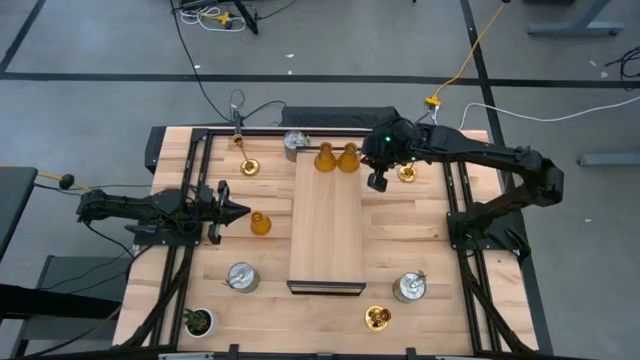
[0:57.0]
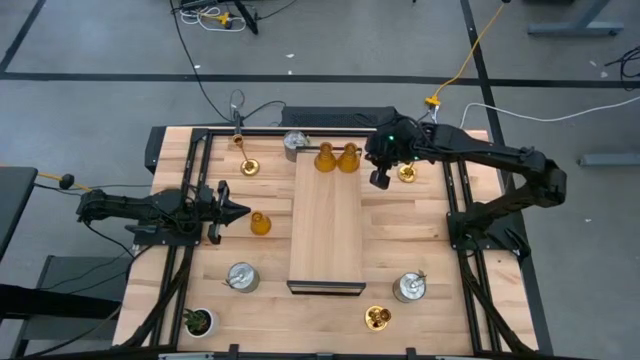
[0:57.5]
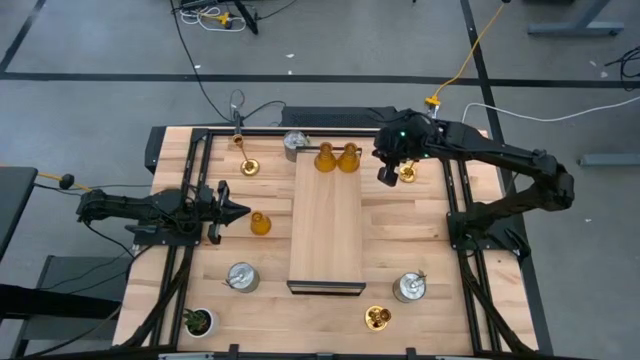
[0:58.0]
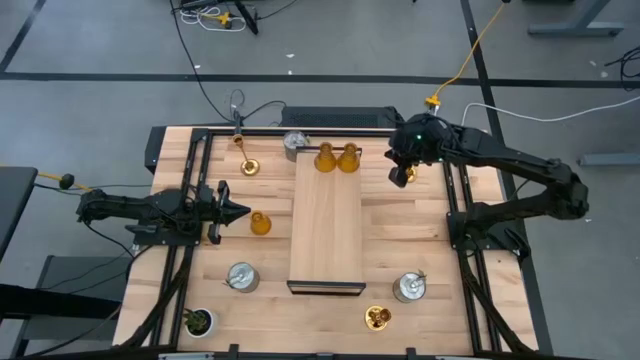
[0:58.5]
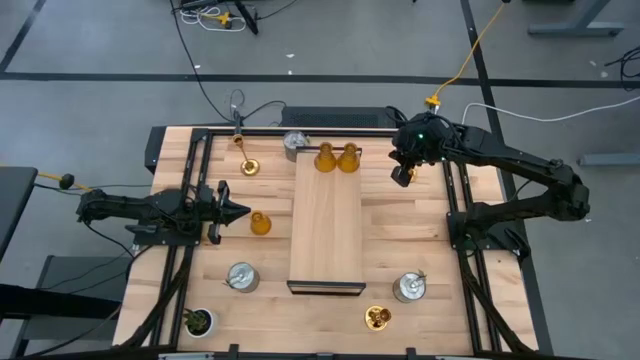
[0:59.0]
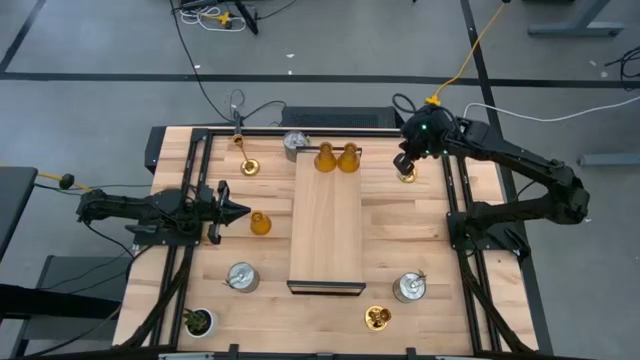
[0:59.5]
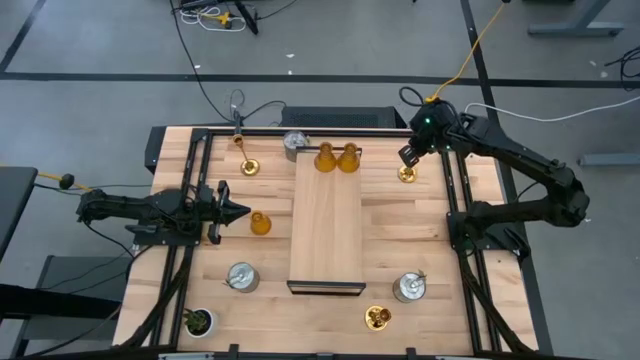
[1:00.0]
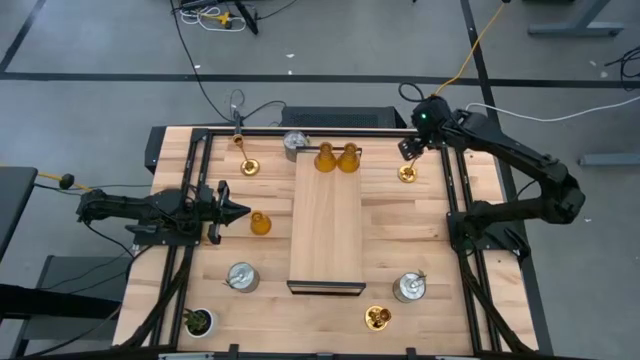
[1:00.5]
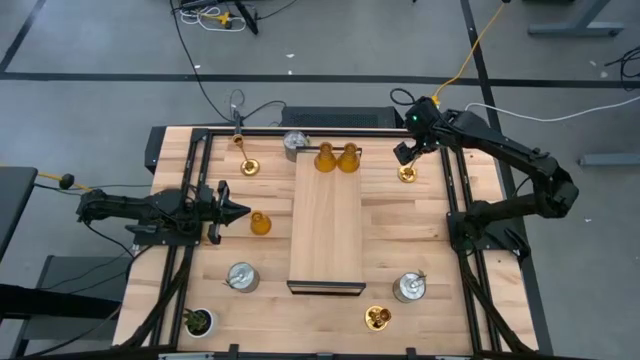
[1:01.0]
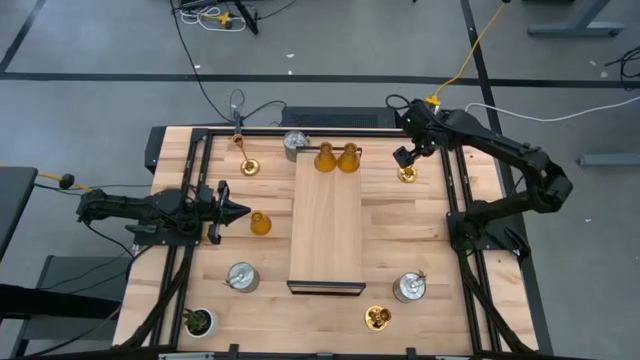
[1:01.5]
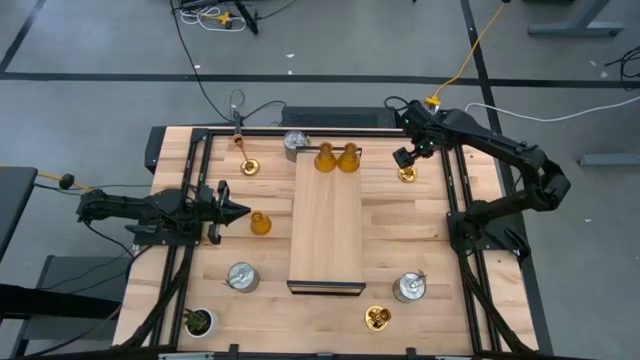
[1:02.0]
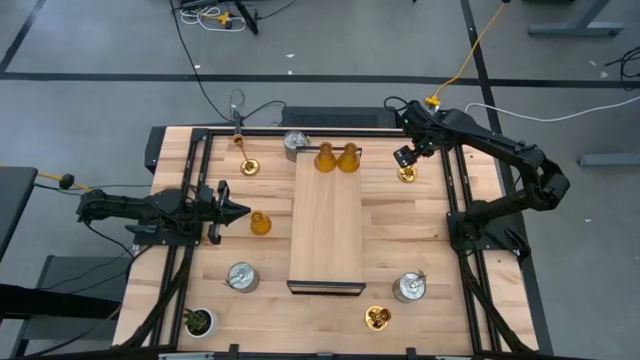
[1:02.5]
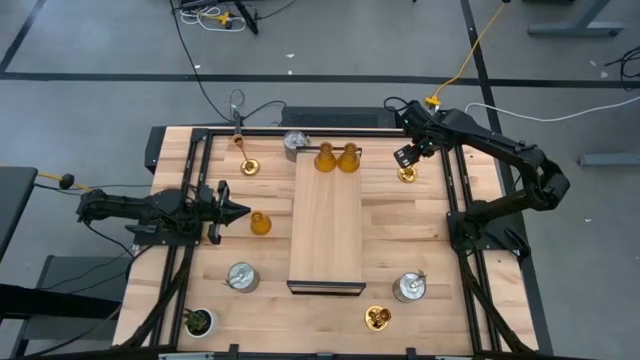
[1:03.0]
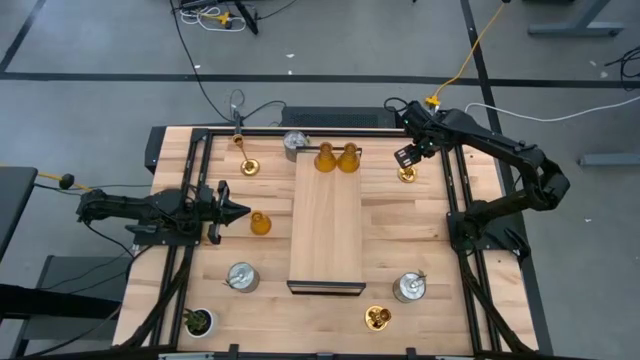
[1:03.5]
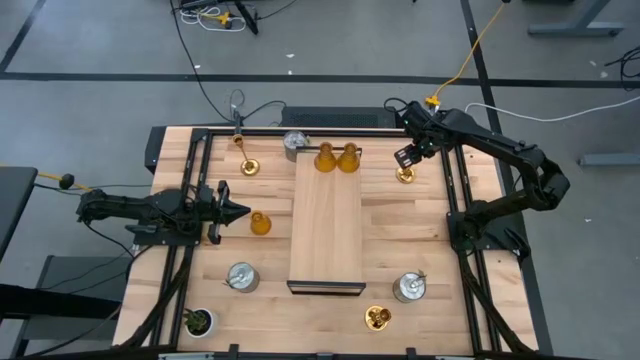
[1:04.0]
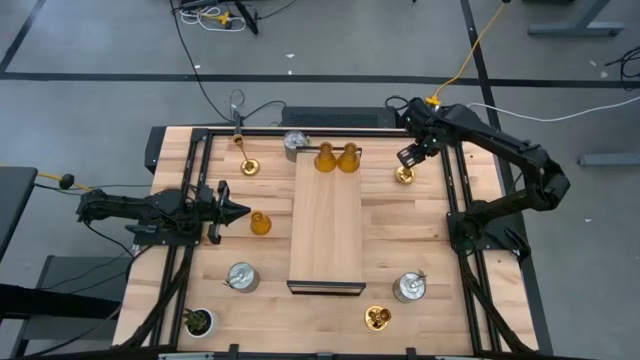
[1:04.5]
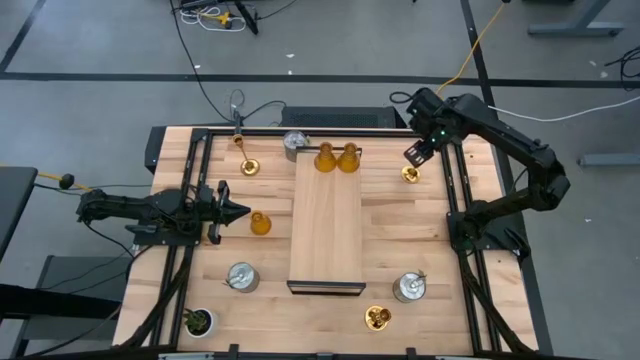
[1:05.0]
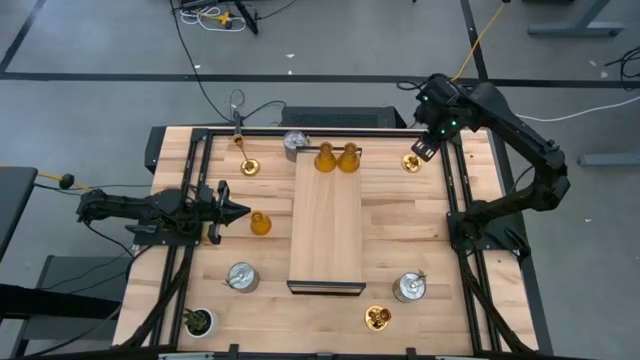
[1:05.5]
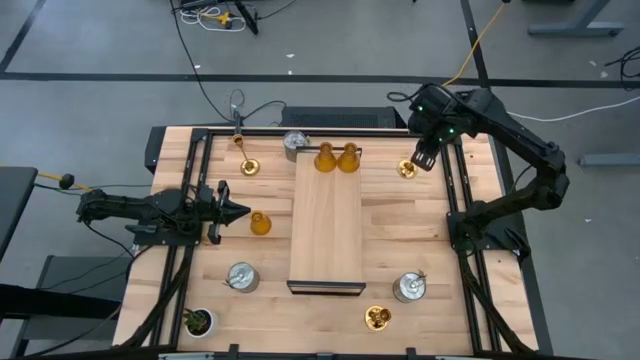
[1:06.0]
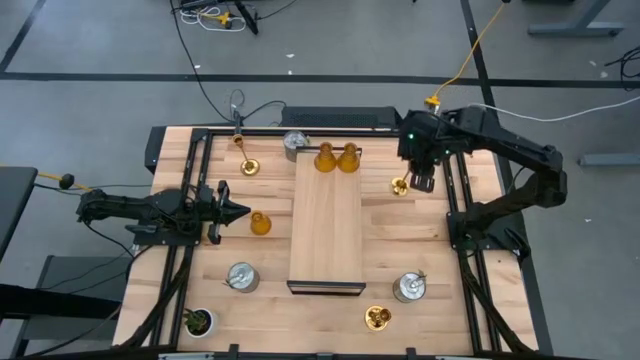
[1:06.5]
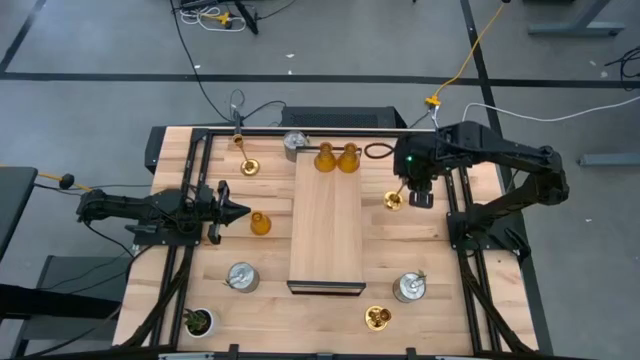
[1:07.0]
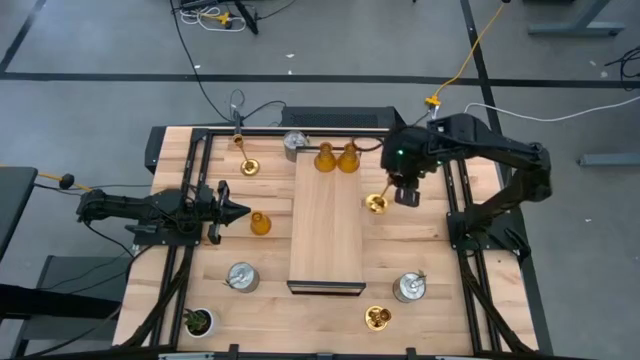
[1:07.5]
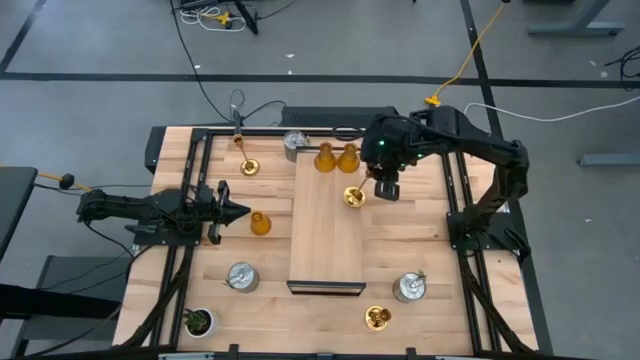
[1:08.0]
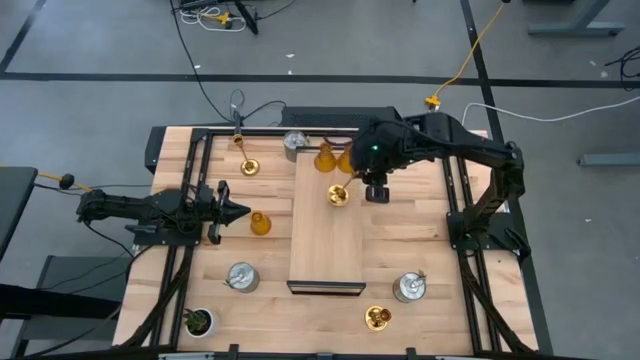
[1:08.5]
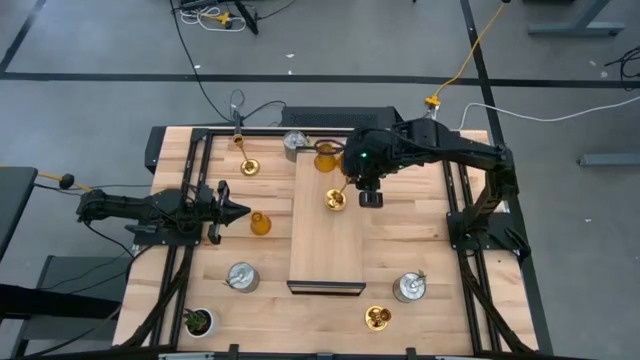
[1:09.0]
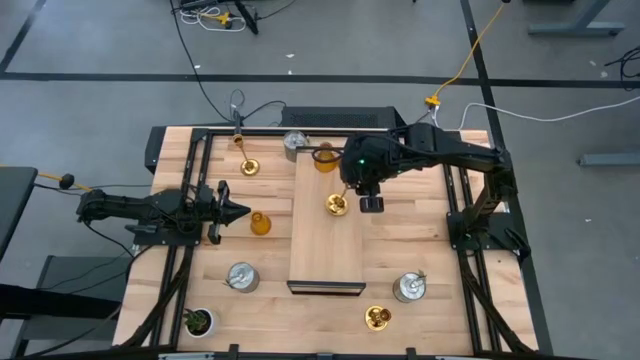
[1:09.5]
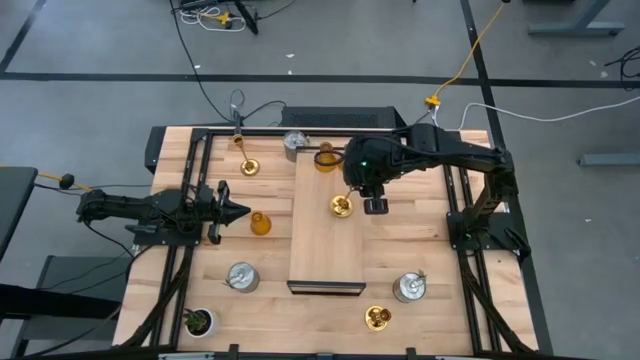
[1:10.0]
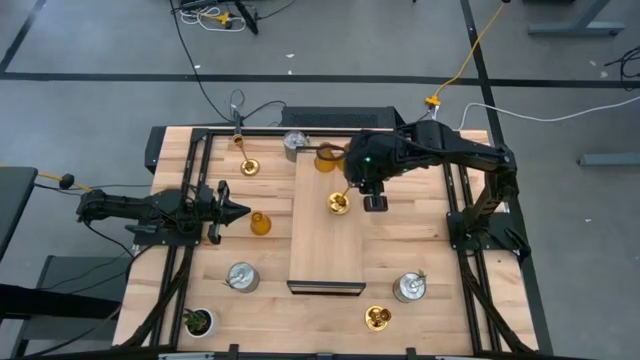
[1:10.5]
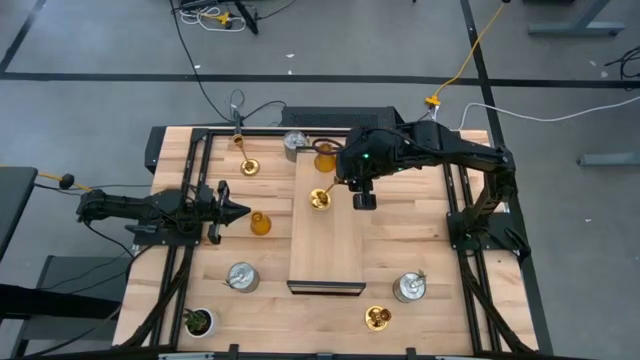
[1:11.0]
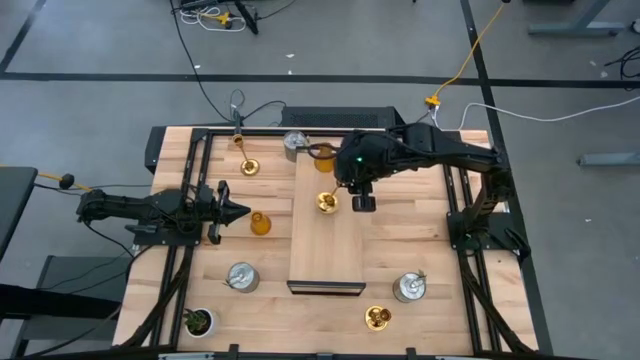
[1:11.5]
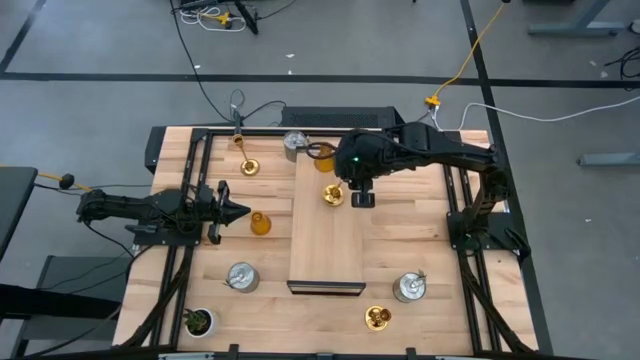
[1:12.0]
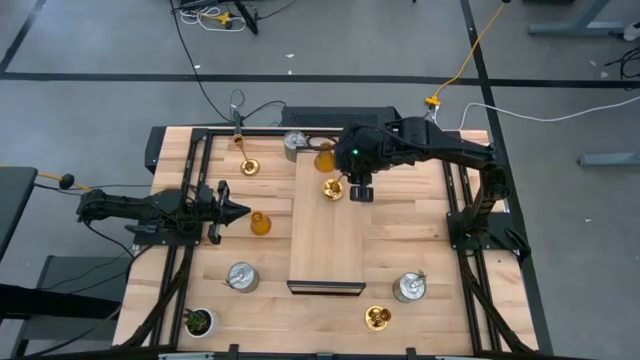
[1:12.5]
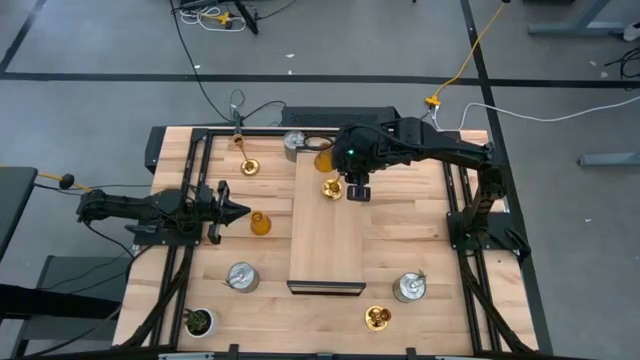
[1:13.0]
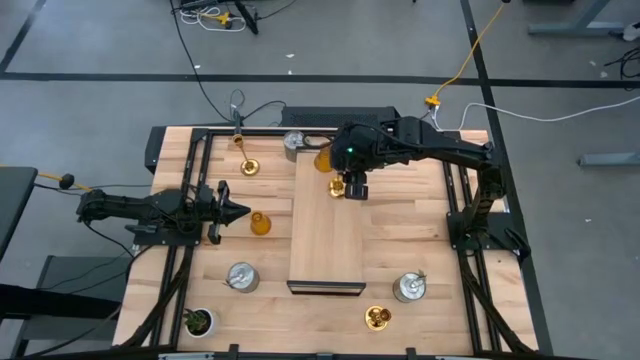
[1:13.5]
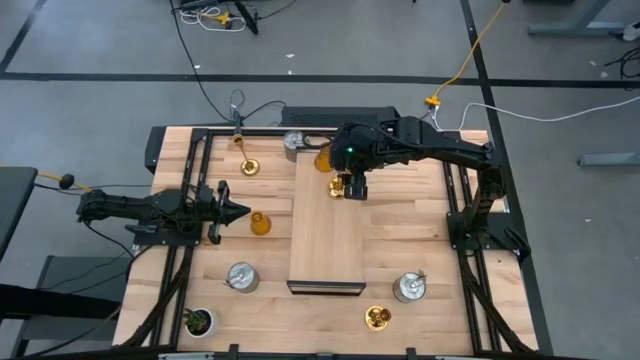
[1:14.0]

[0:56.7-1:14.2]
Task: Pick & Place candle stick holders
Put the top right candle holder on the shelf
